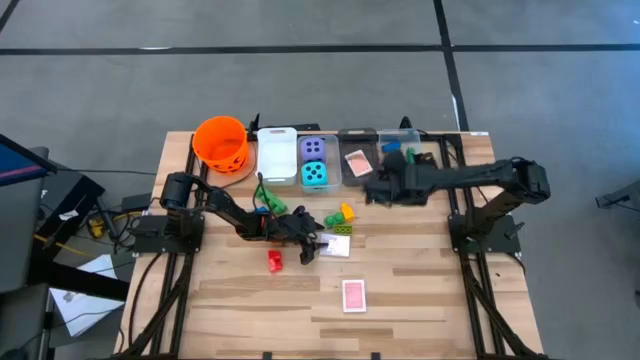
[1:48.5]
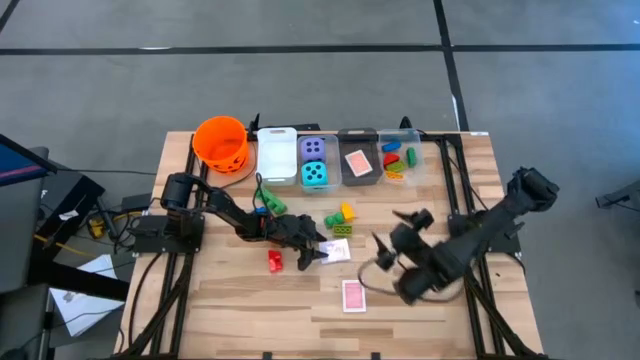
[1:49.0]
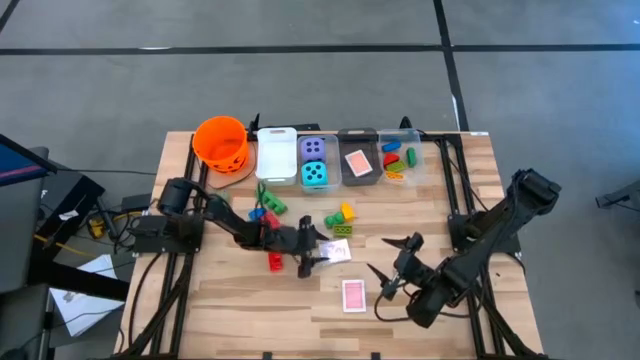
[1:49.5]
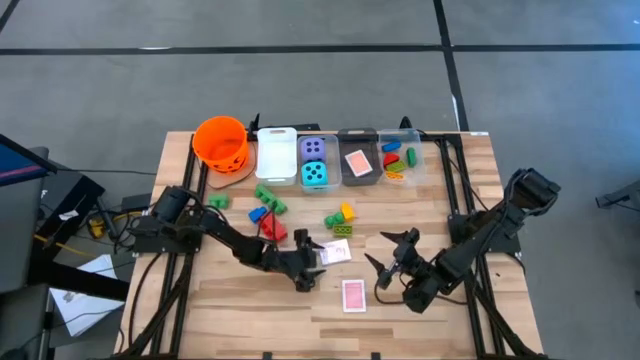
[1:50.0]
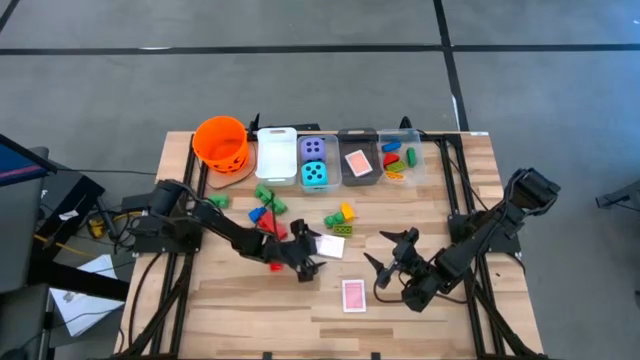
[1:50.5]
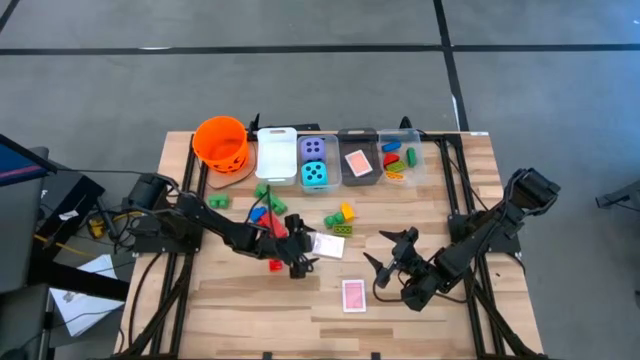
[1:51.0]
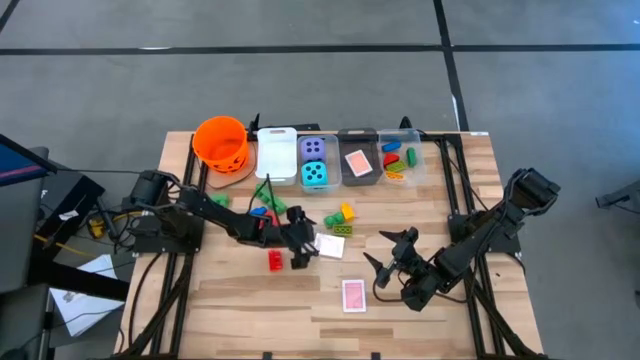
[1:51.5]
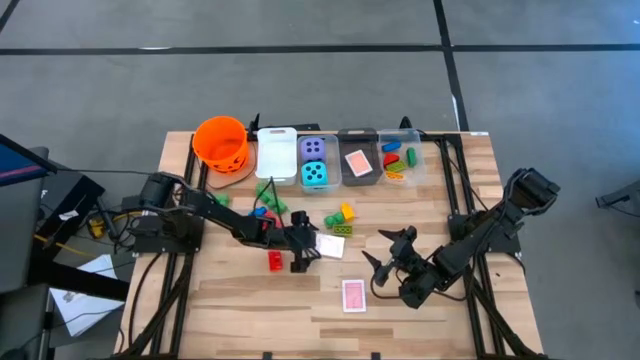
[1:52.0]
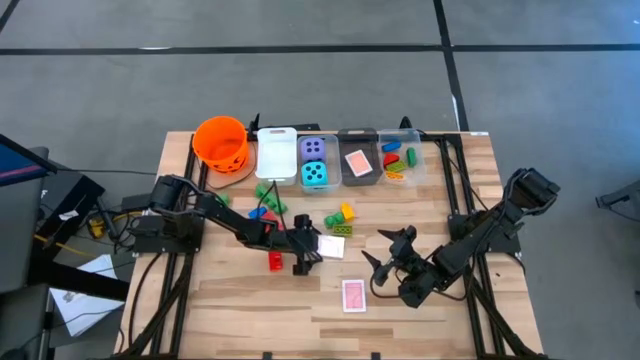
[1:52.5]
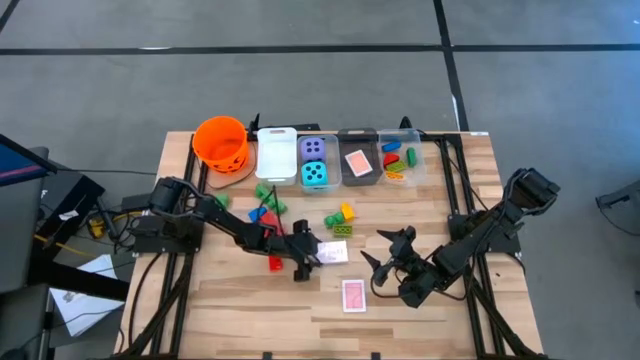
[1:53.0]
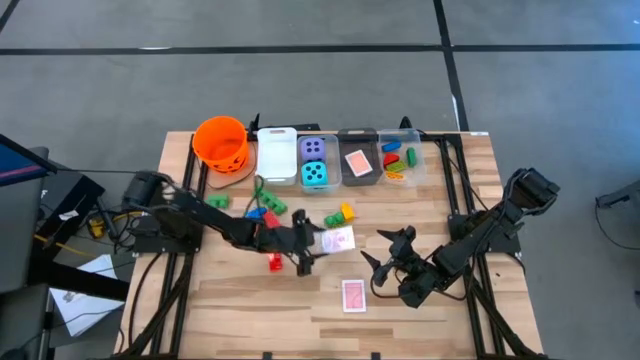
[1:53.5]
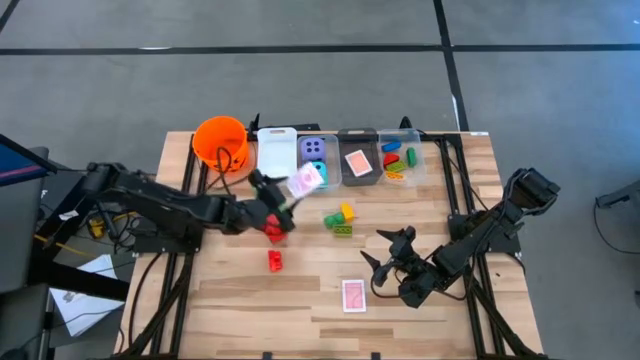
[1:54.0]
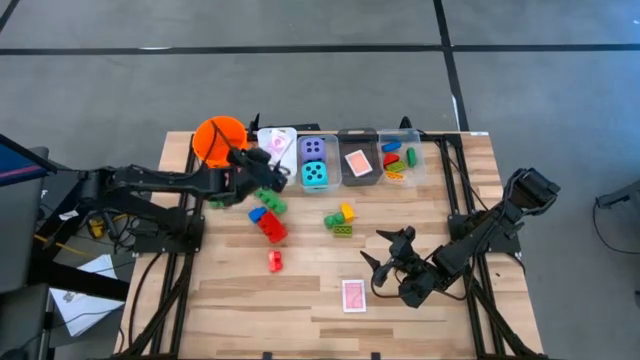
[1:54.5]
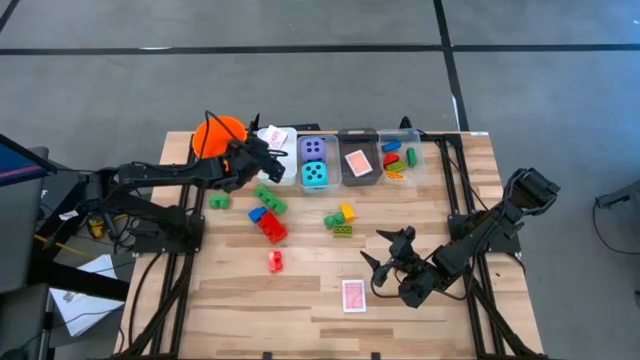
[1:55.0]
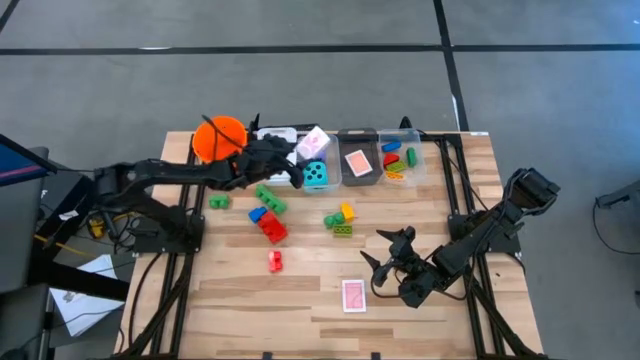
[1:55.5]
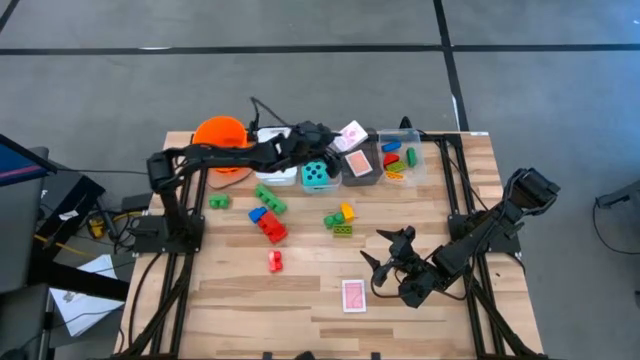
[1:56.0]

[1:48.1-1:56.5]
Task: Pick & Place Toys
Put the pink deck of cards into the black bin

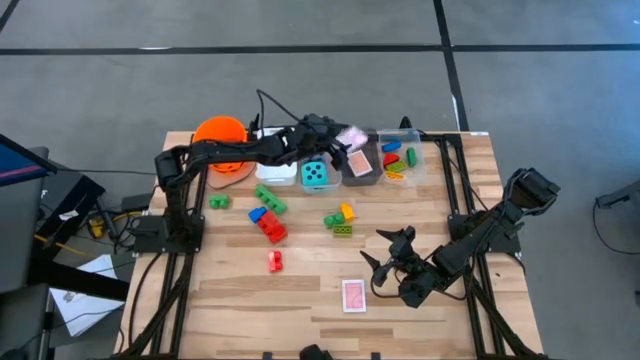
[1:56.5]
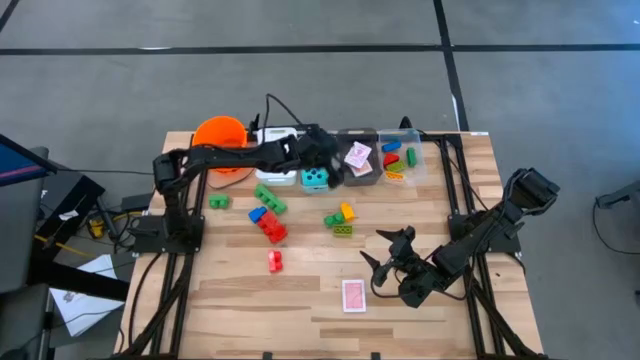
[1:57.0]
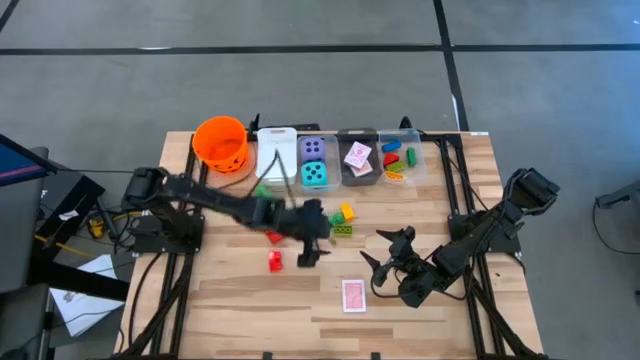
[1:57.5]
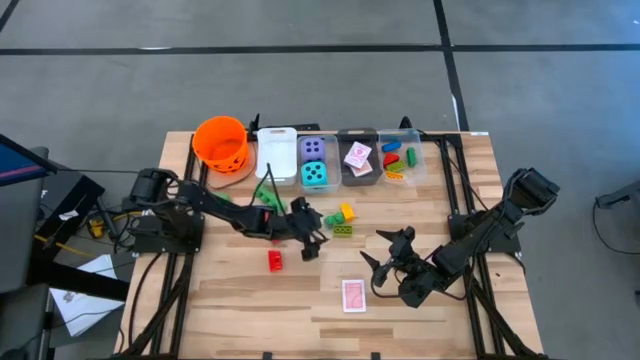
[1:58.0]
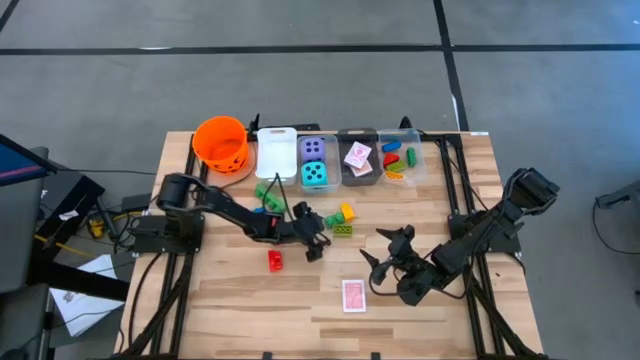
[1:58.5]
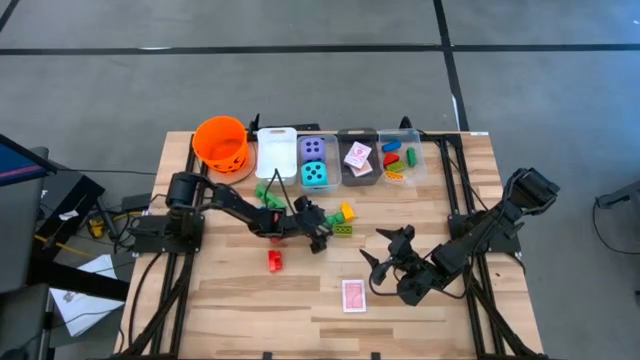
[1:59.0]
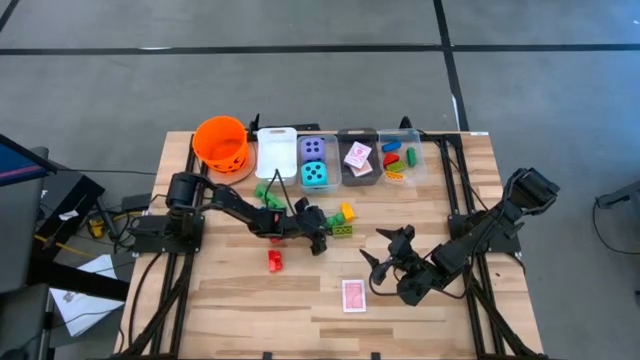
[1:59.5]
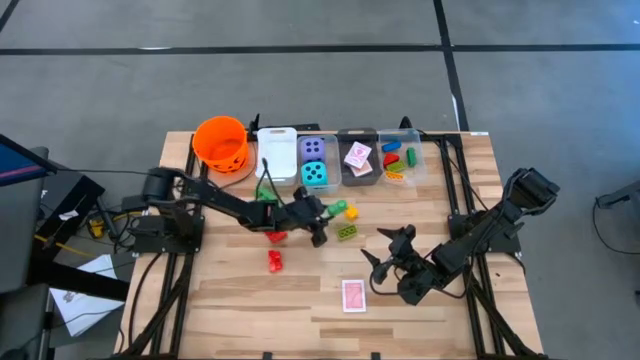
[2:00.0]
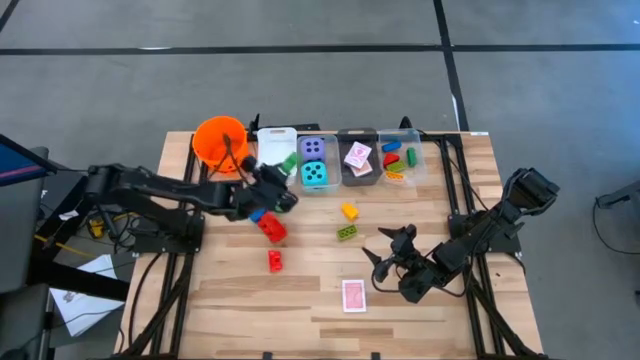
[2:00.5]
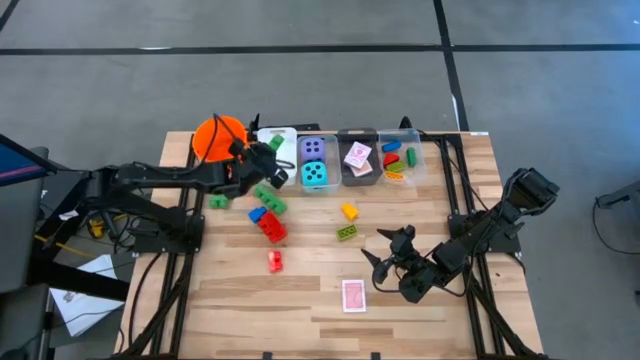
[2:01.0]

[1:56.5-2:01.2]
Put the big green game piece into the white bin

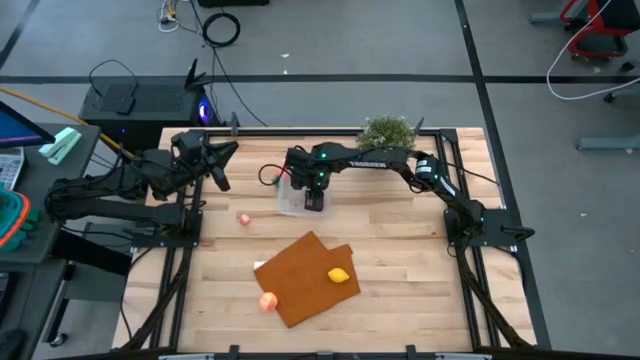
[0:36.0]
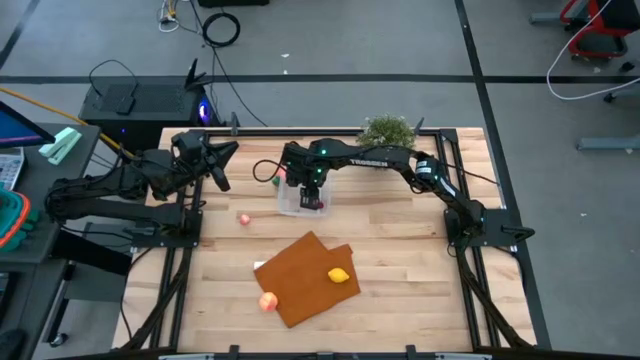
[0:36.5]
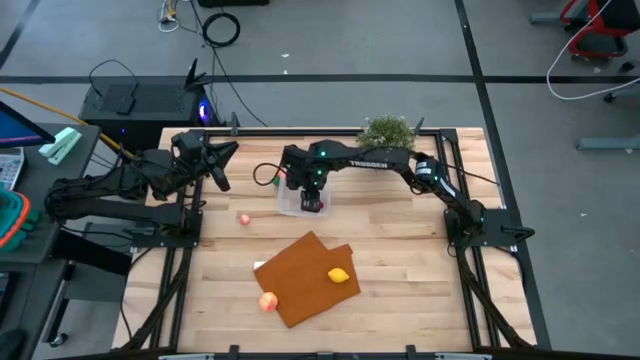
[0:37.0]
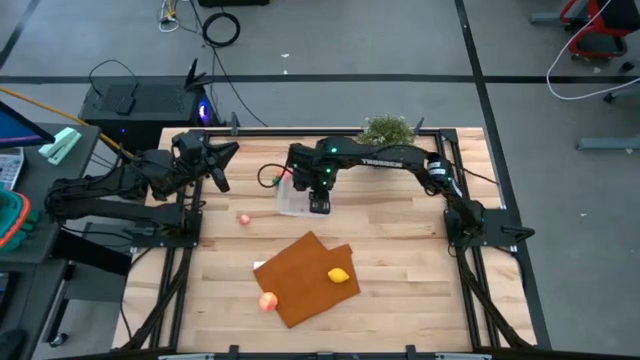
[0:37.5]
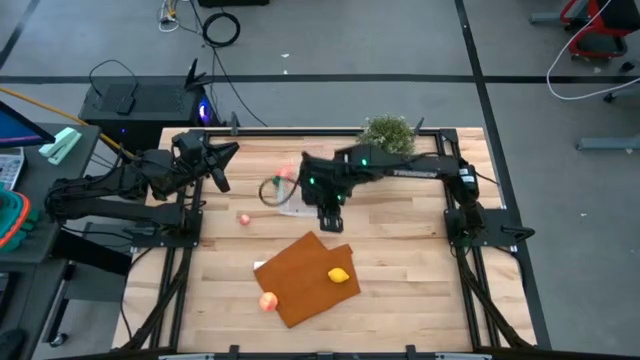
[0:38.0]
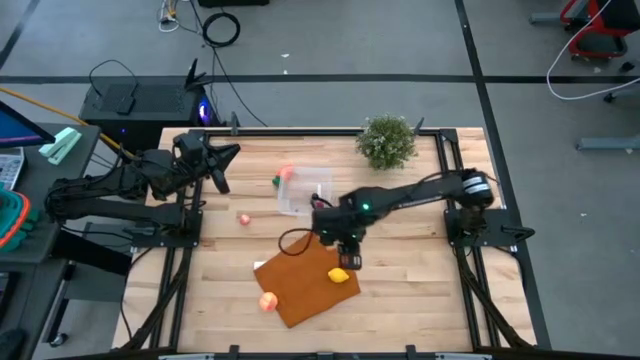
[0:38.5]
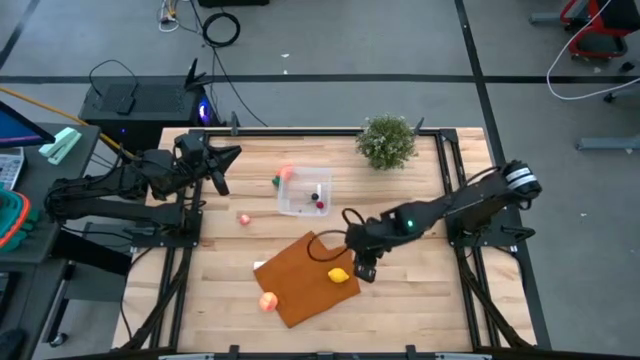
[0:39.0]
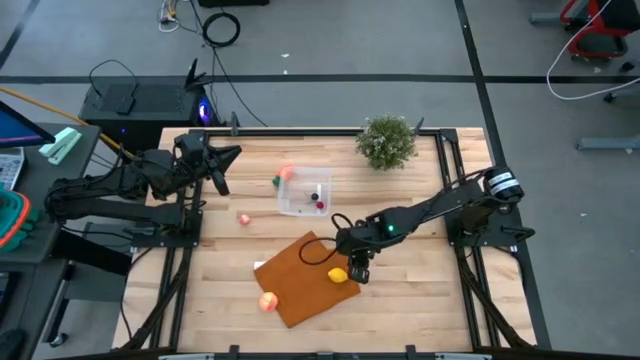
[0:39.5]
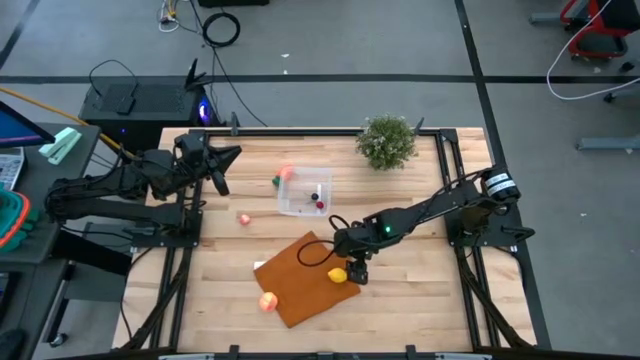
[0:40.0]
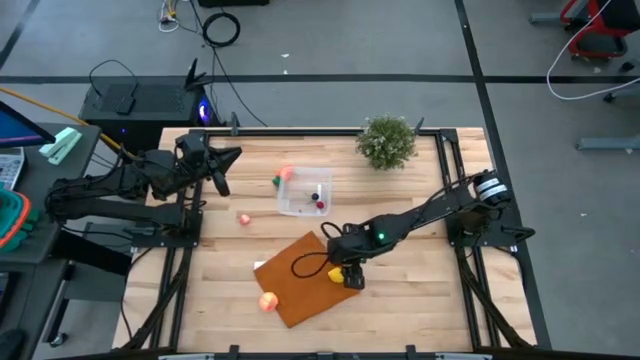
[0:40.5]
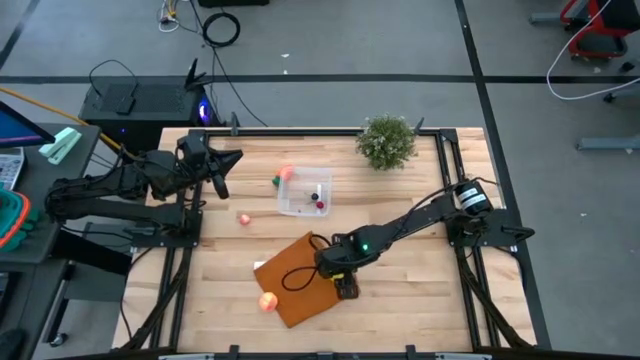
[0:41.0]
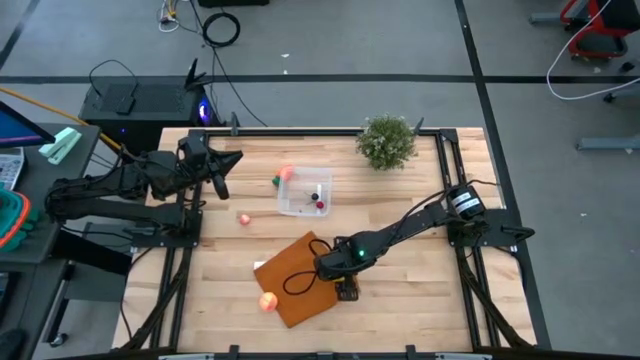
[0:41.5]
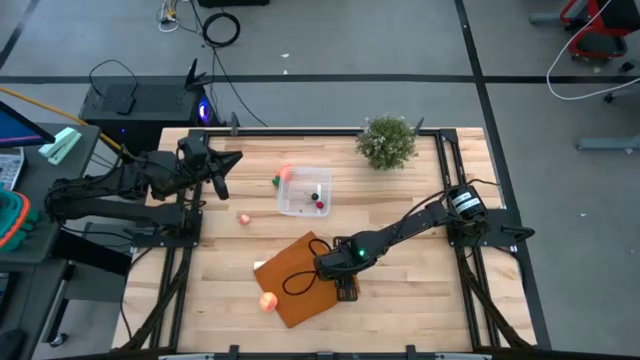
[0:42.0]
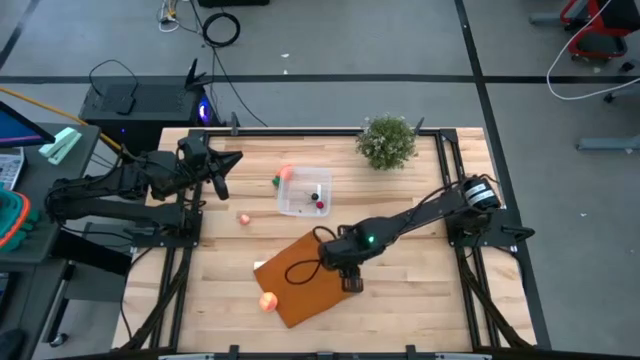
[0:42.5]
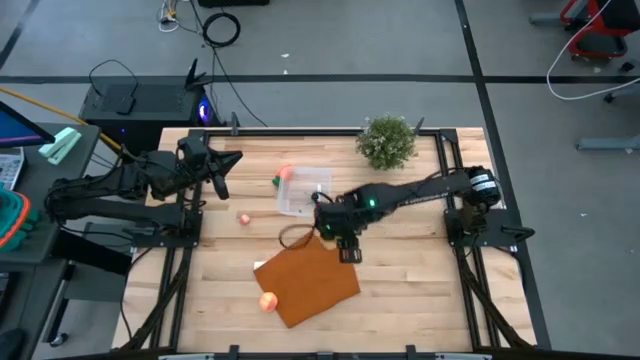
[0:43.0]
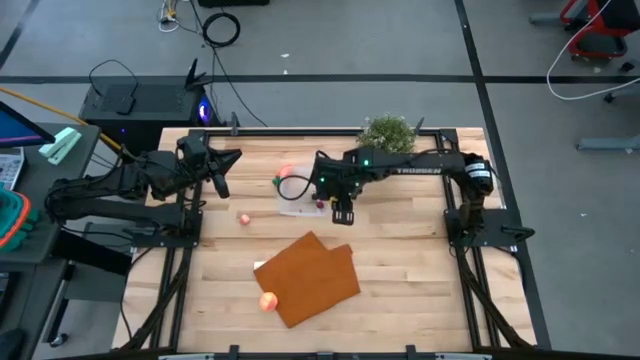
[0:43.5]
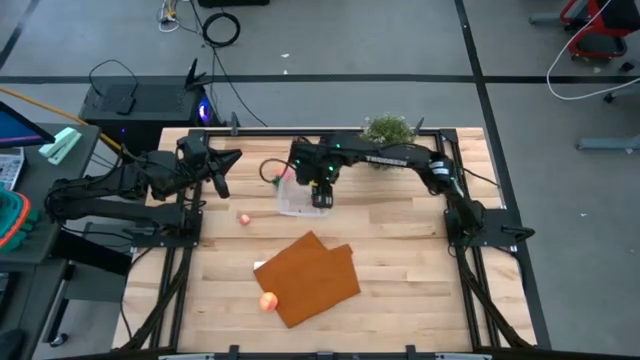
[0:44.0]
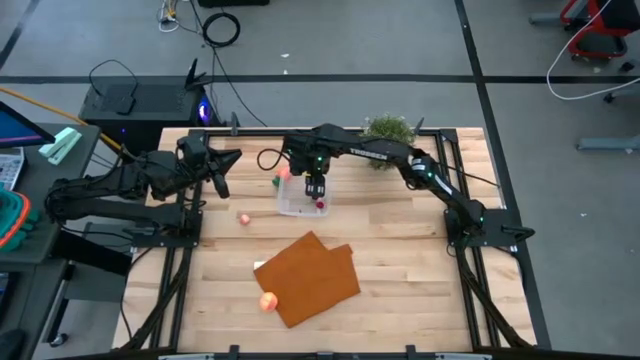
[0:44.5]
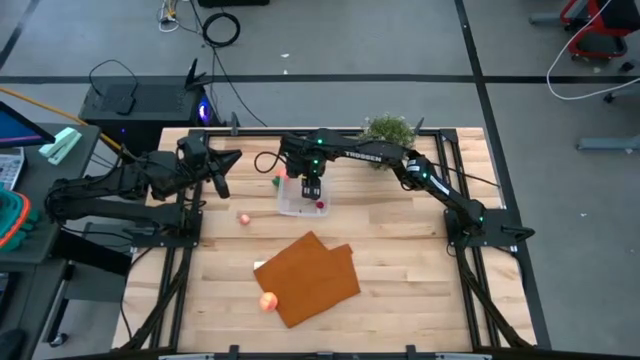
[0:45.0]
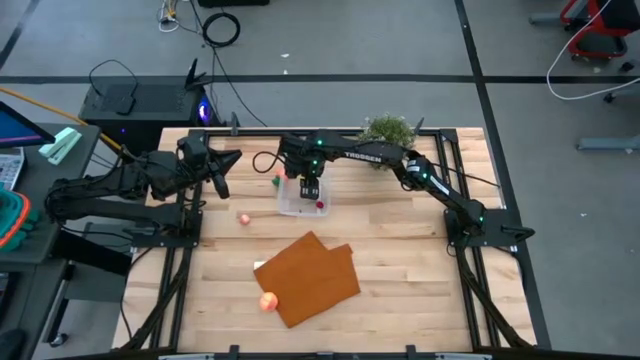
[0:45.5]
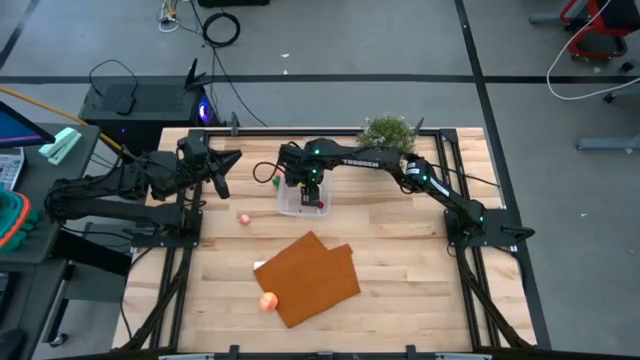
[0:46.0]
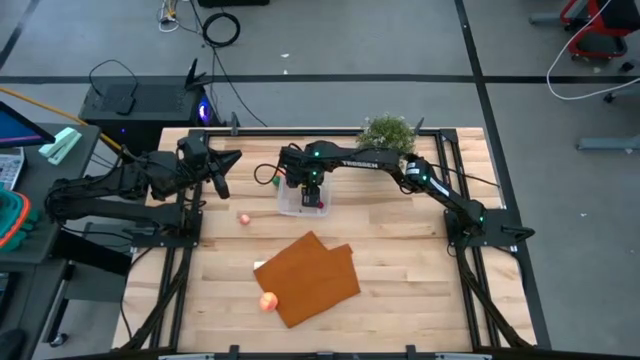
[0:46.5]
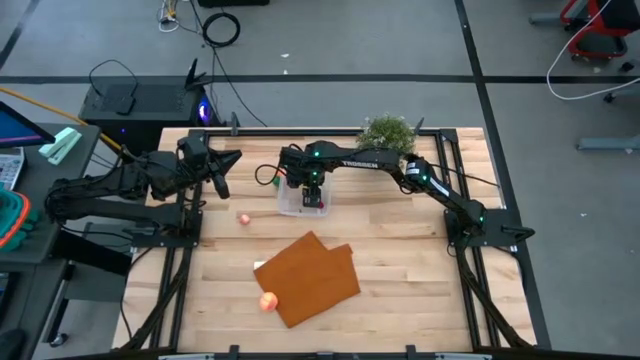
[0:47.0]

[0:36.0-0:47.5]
Task: Pick and placing Produce into tupperware
Put the yellow lemon into the transparent bin
